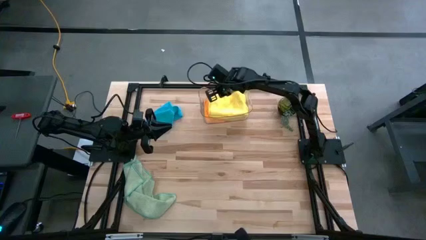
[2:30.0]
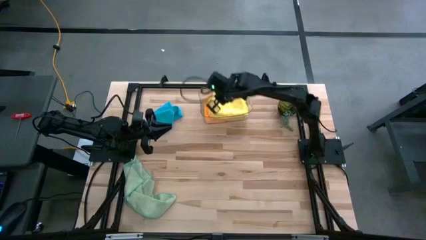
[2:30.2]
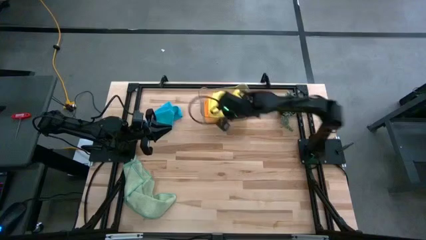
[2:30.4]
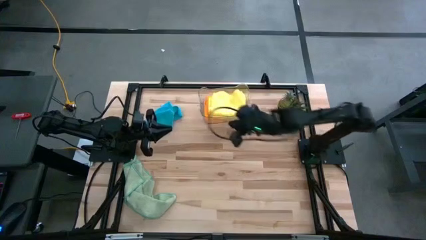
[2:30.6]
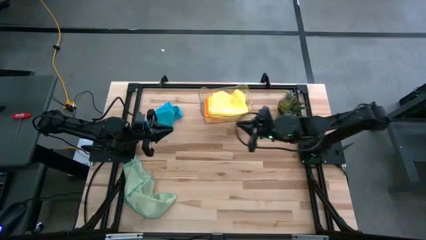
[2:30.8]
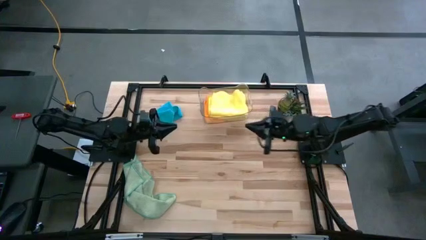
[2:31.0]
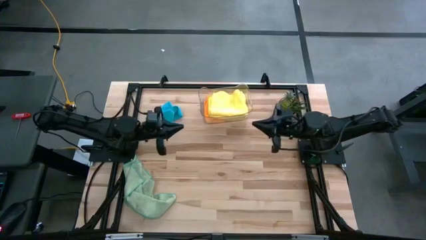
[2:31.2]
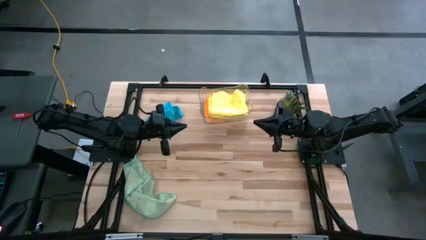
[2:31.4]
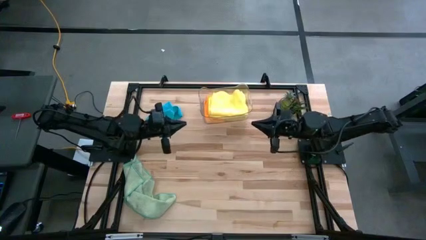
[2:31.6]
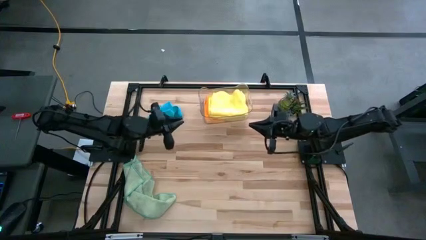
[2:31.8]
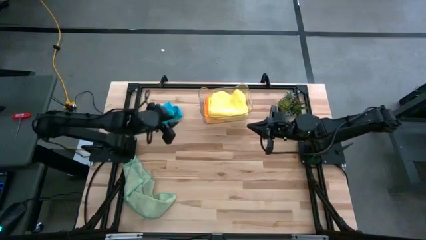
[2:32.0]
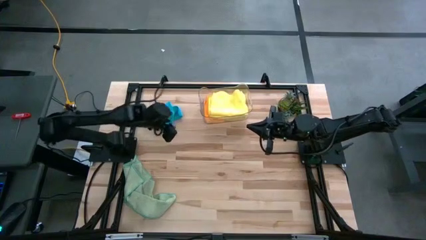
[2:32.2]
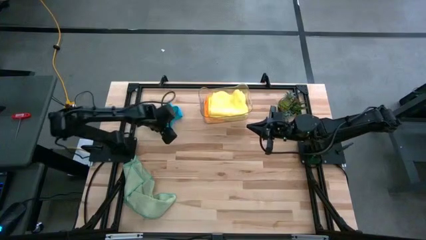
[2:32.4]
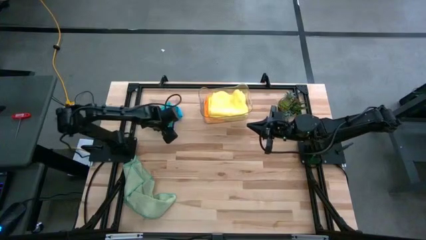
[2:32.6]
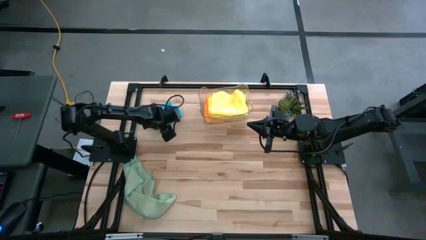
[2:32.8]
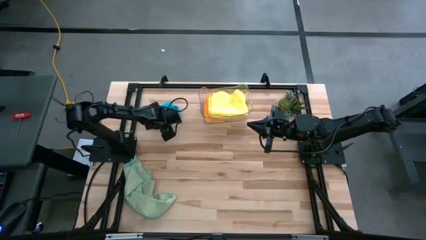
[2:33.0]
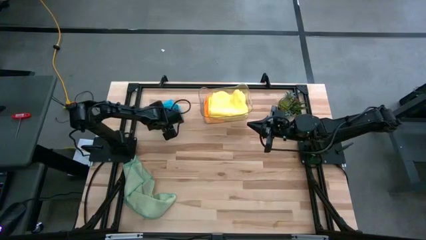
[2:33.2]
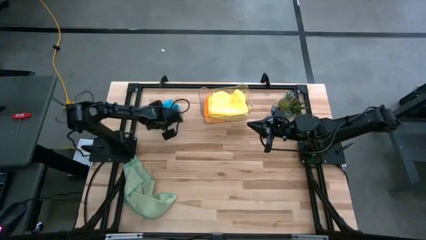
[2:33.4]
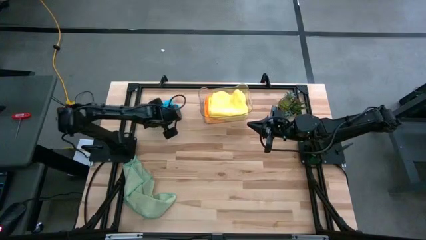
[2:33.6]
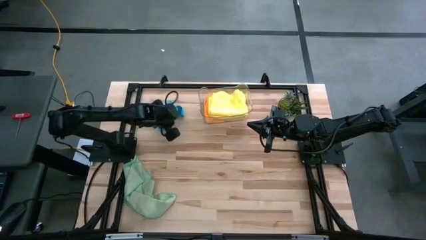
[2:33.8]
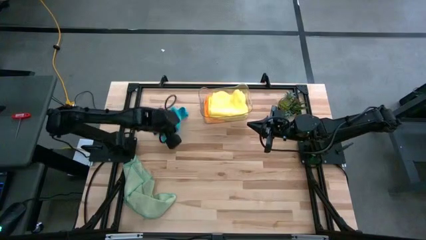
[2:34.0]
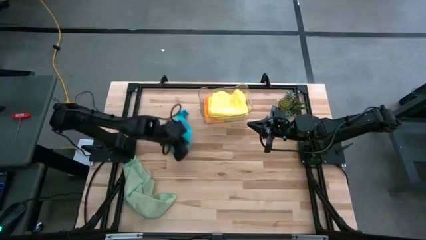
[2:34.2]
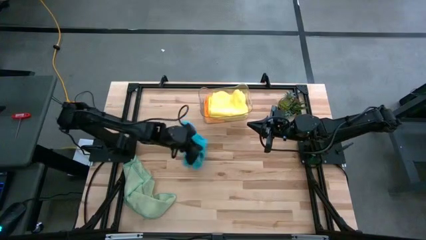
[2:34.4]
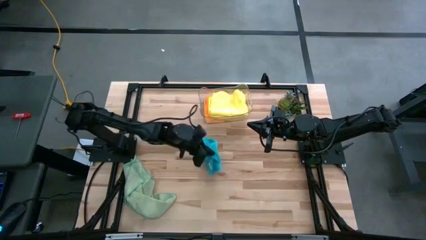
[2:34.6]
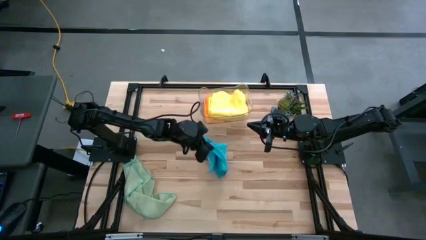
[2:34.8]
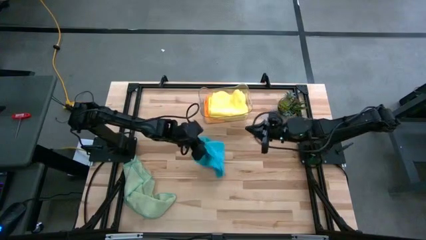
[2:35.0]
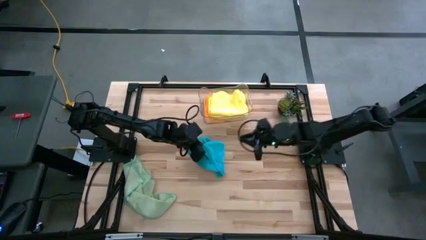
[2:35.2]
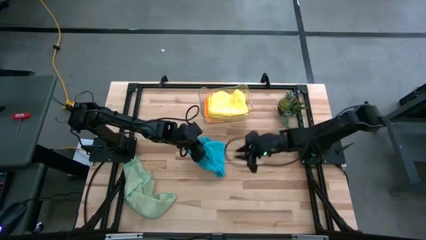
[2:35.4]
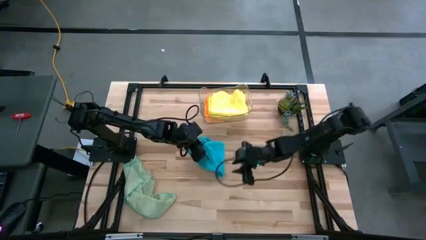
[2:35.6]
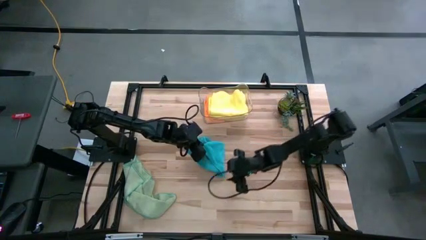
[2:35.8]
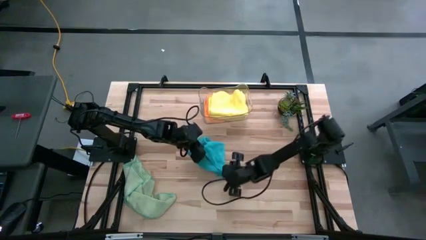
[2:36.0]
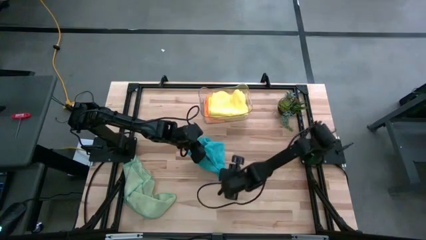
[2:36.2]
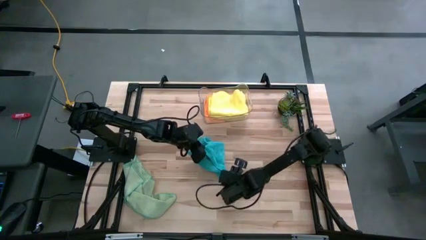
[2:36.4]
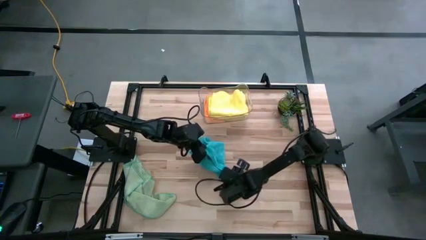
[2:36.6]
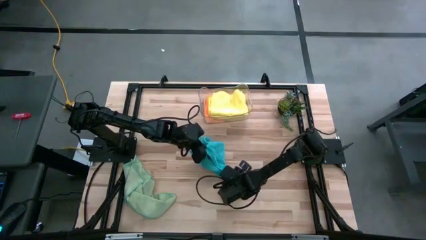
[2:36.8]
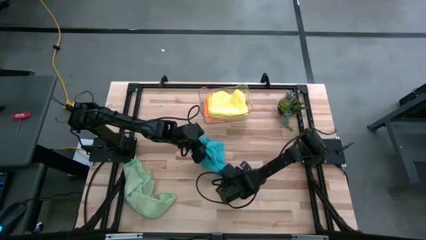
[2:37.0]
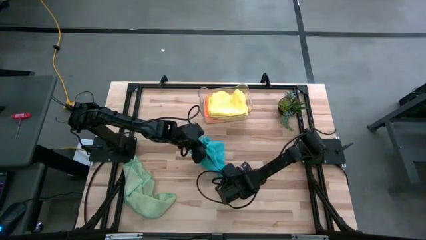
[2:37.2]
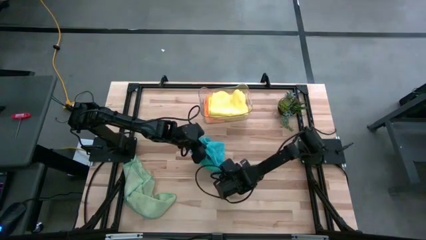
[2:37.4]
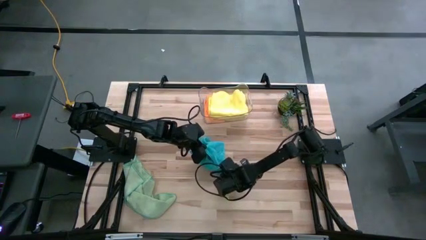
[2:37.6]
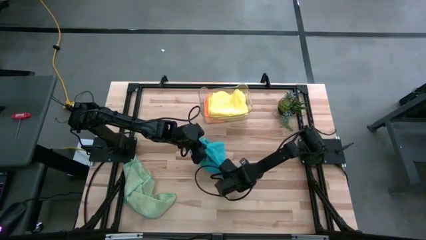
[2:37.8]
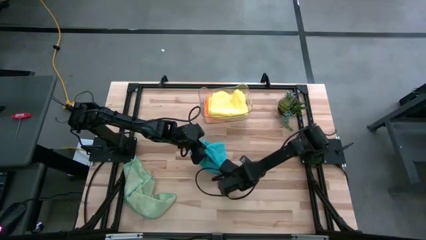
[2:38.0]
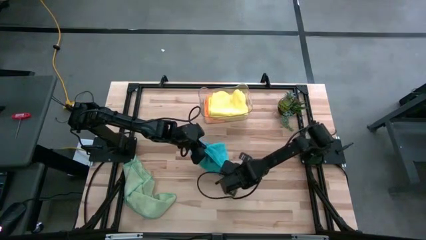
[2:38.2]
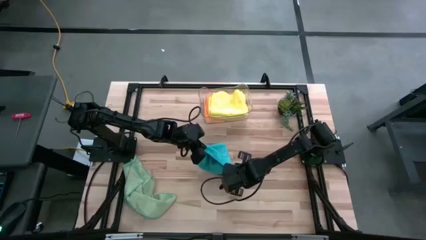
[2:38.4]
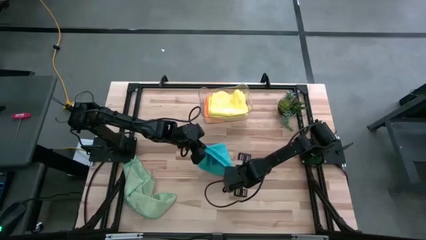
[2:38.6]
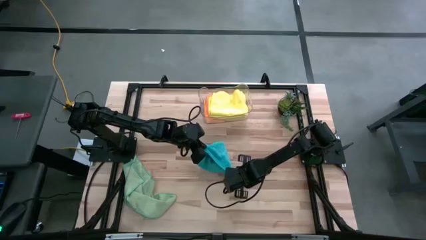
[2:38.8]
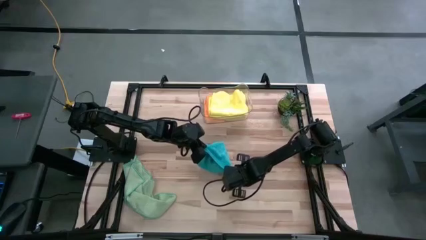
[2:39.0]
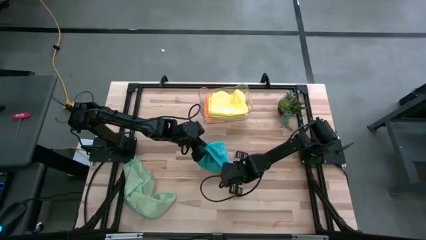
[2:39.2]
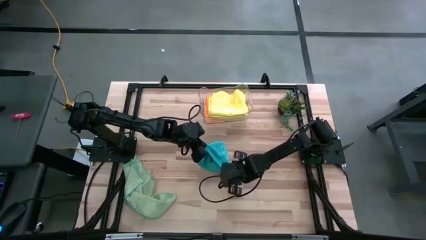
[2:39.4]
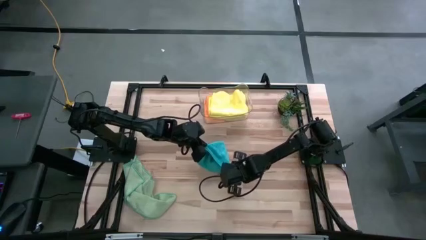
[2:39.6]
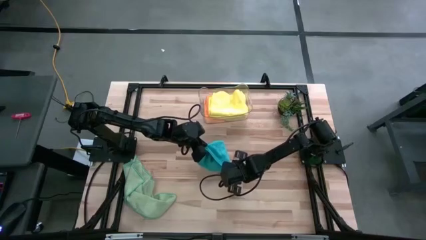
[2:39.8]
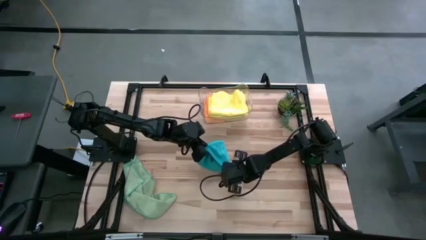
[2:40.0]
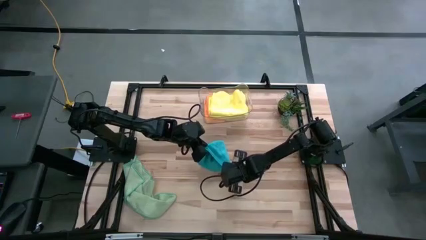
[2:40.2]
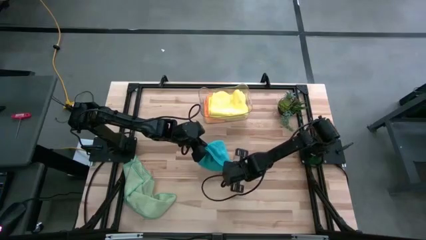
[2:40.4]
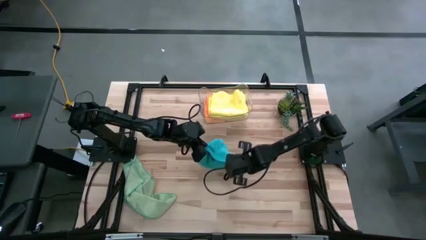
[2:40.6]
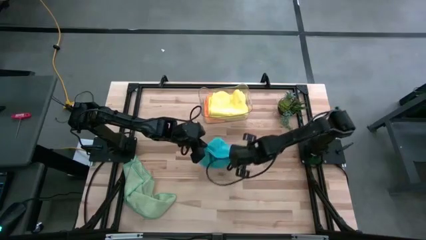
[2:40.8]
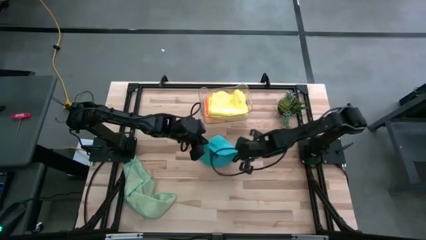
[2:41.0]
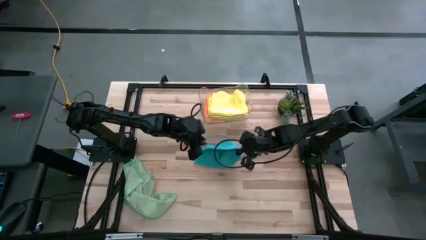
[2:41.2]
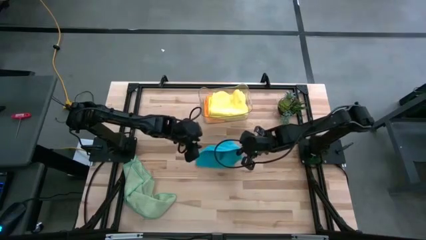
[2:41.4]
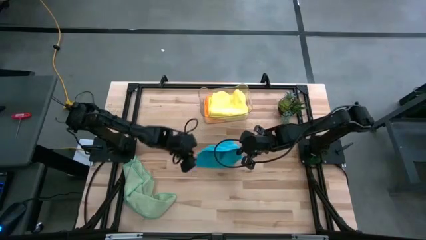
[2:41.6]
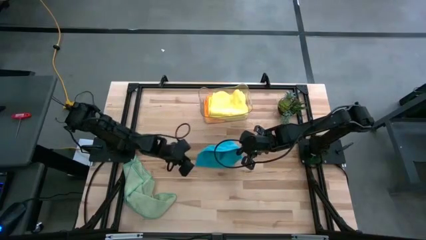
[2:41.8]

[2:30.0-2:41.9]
Task: Fold microfiber towels
Fold the blue microfiber towel

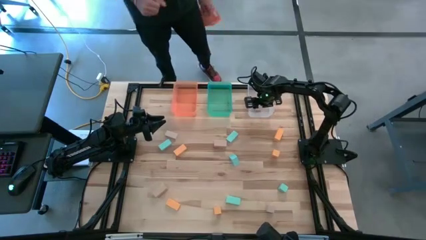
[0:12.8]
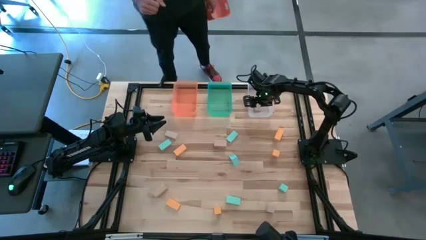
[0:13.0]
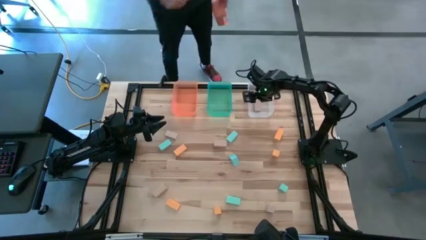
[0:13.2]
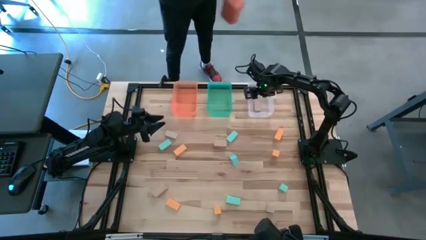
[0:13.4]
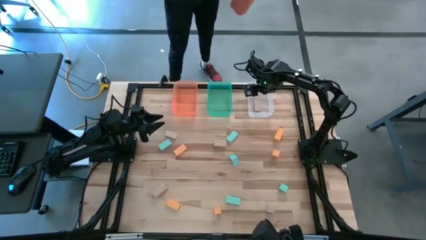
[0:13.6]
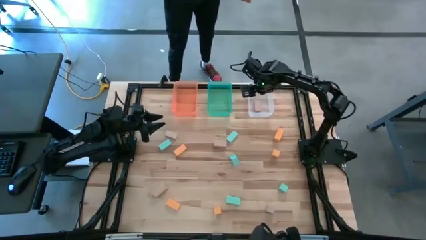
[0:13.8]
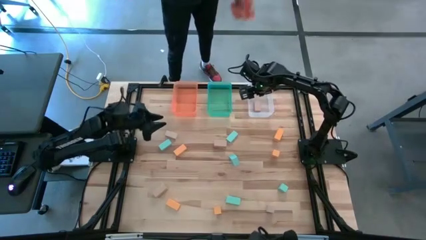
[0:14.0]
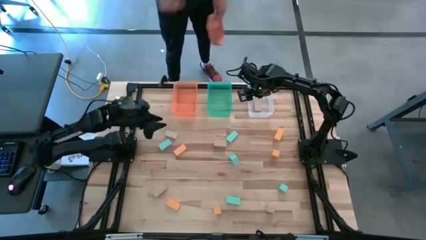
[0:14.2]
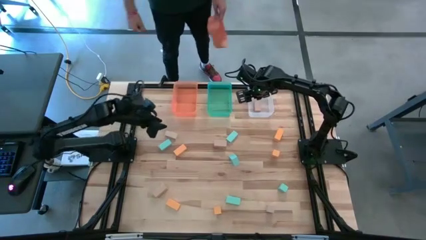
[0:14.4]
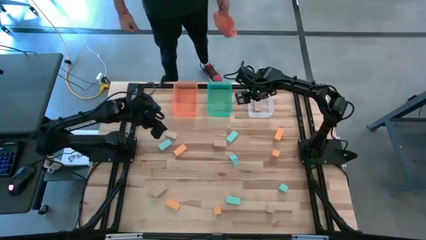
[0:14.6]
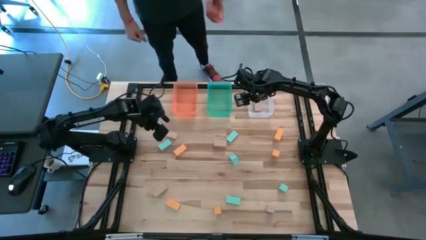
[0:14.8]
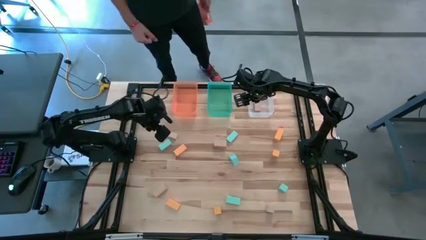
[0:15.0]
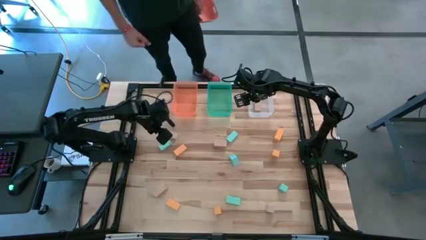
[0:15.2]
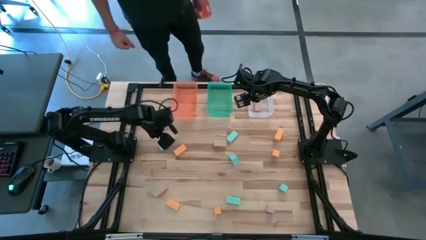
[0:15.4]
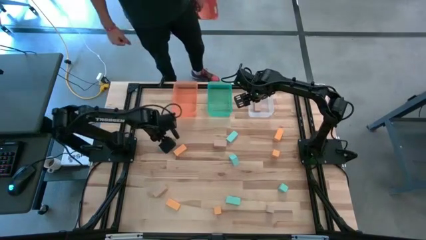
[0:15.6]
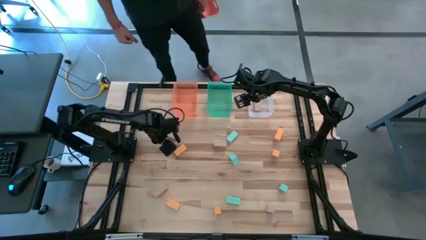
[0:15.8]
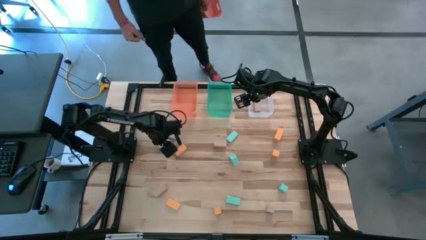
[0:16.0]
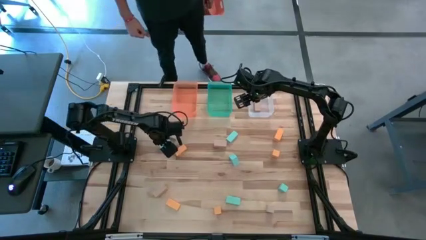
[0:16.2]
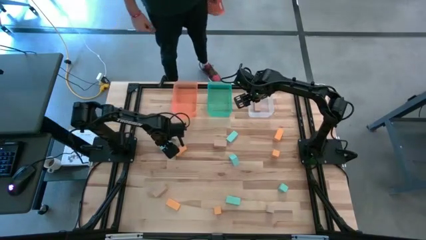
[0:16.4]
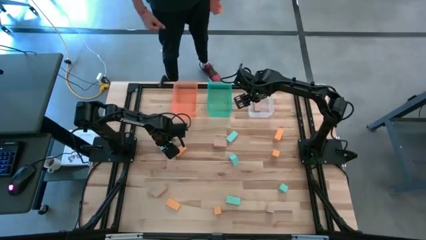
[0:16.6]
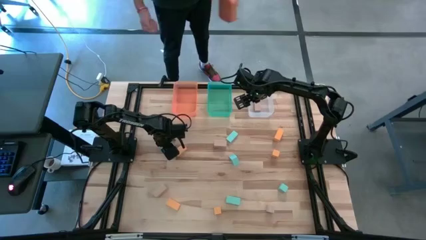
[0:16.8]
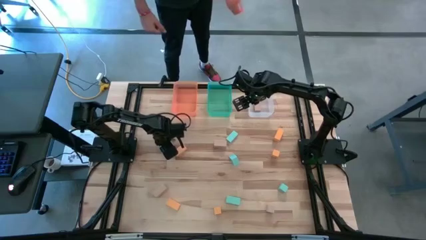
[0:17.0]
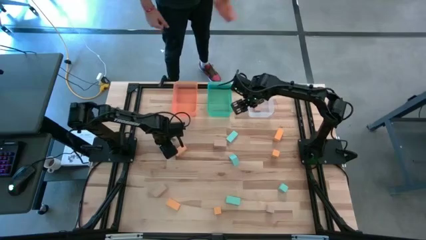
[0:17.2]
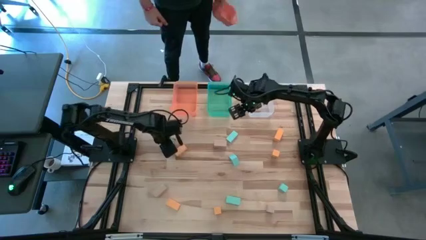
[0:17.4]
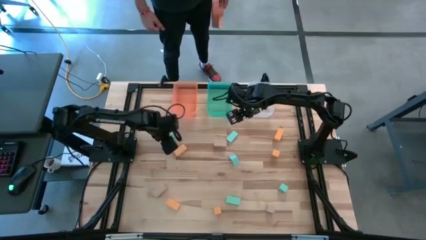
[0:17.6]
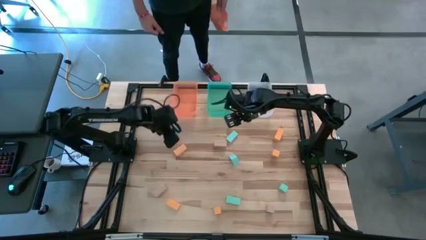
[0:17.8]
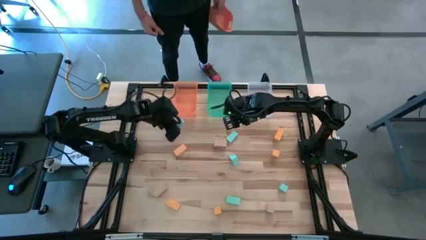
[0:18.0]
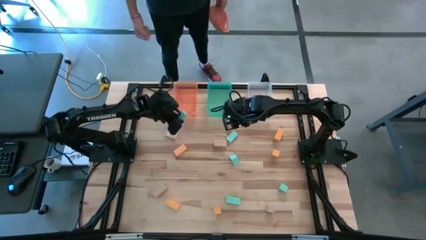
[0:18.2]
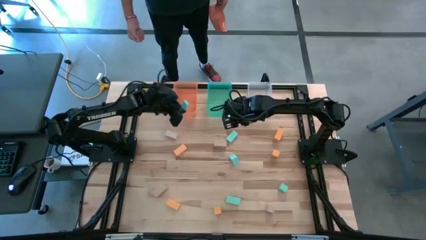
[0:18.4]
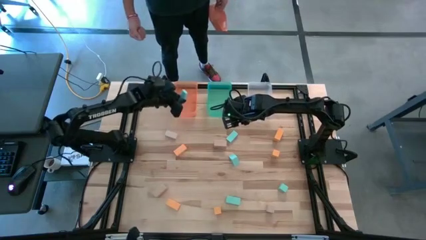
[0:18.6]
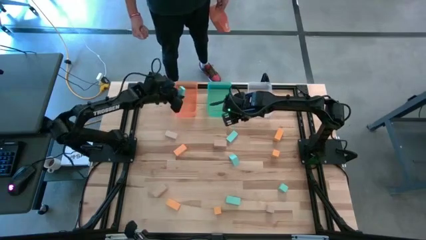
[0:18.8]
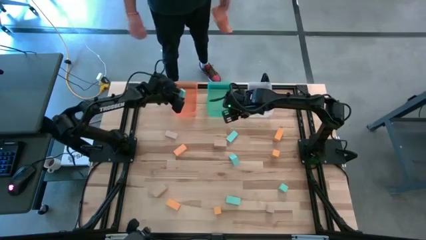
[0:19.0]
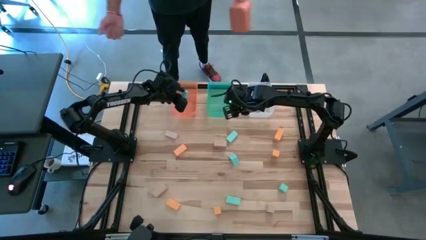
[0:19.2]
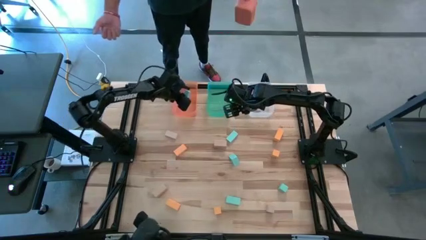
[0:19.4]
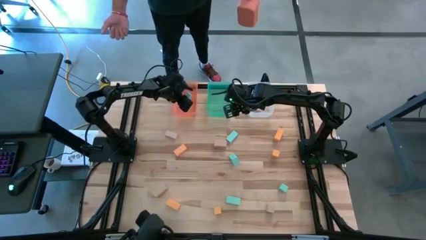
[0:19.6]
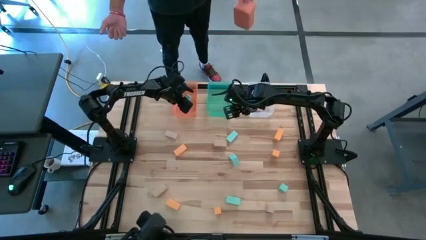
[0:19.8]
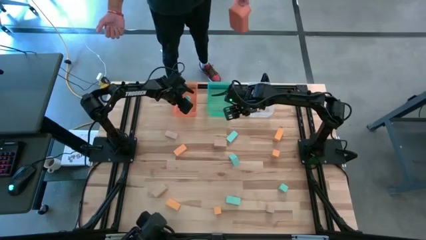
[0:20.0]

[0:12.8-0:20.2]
Task: Sort & place blocks by color
Put the light blue block into the orange bin
